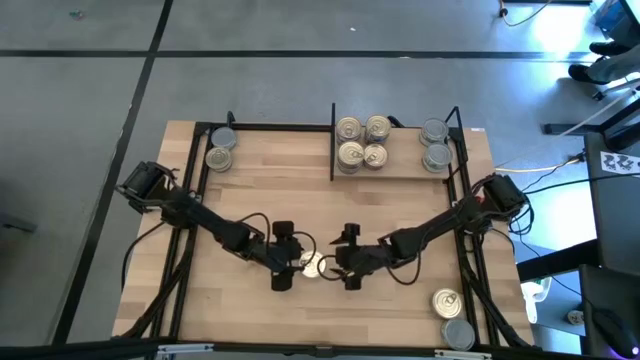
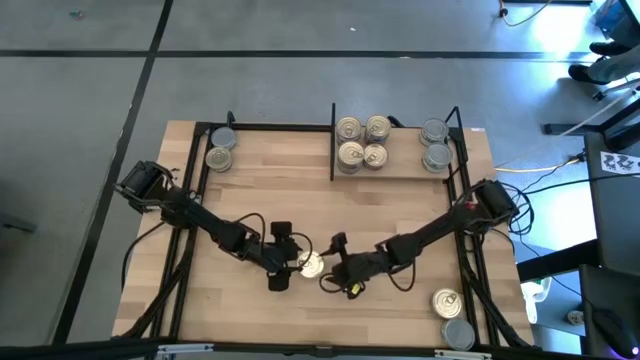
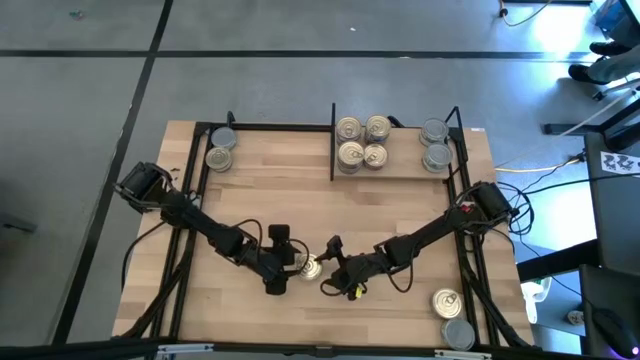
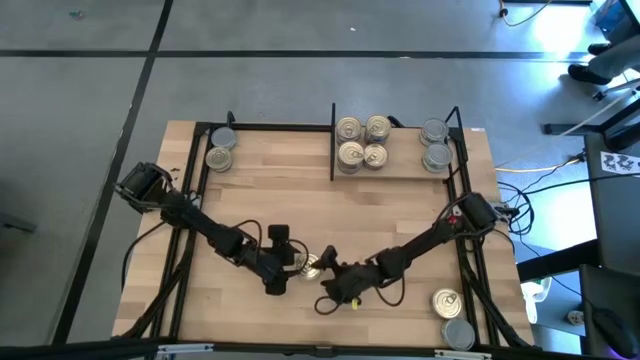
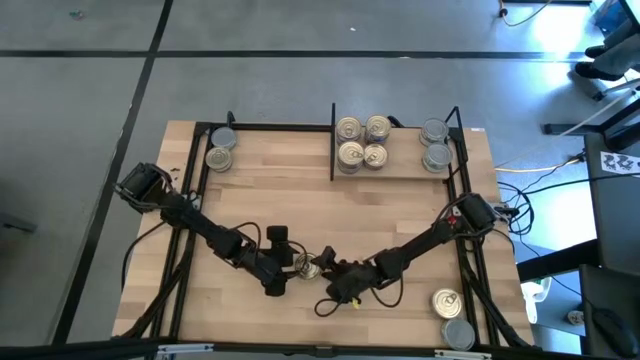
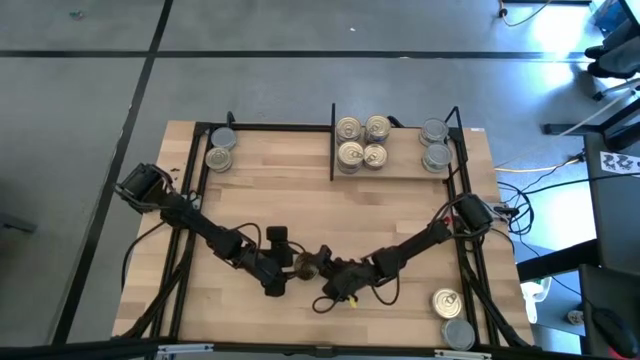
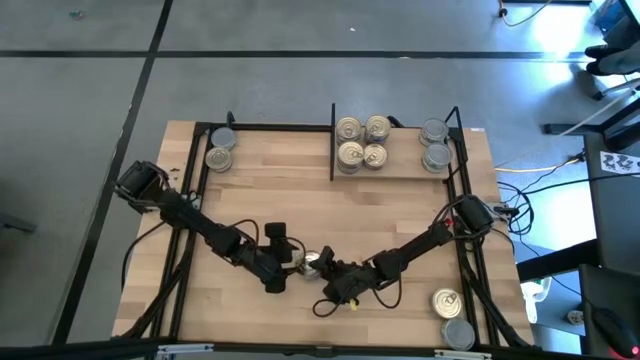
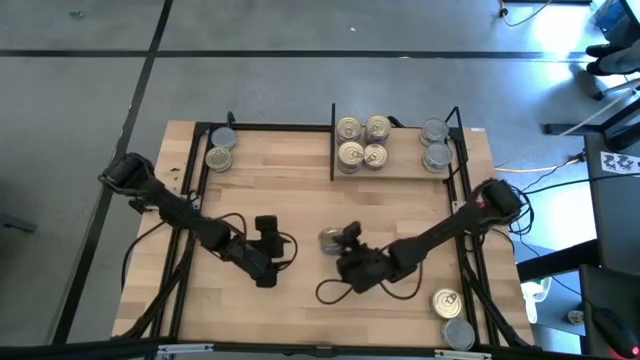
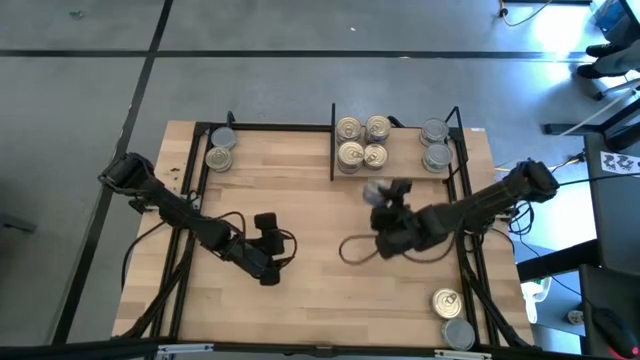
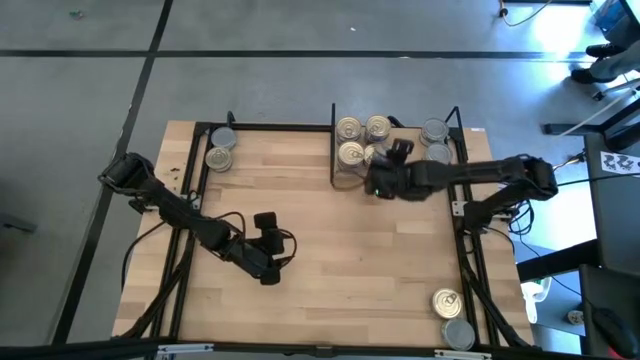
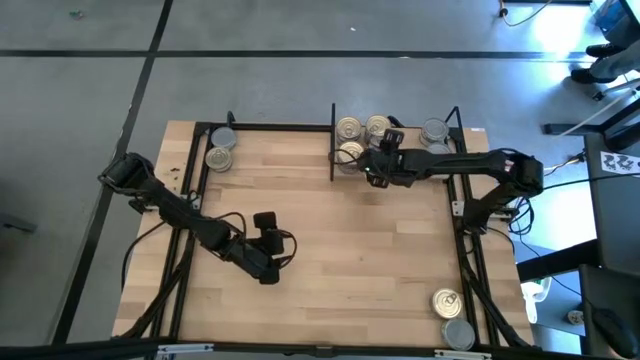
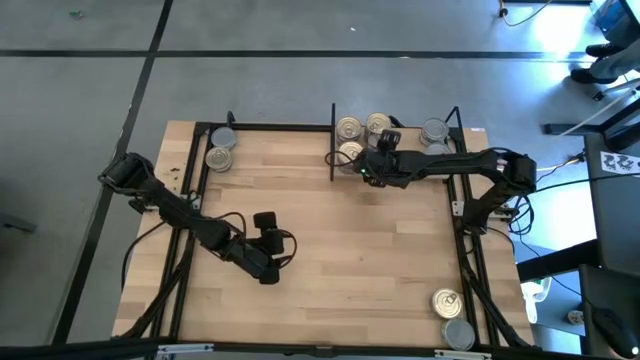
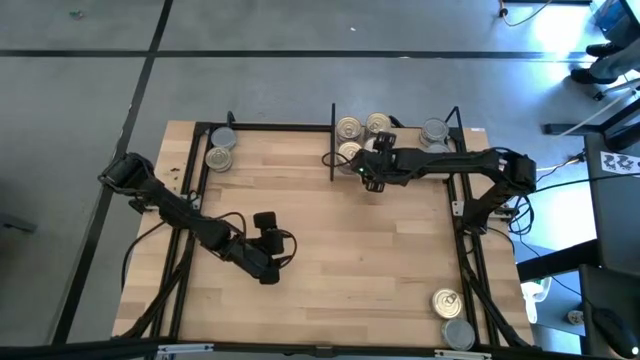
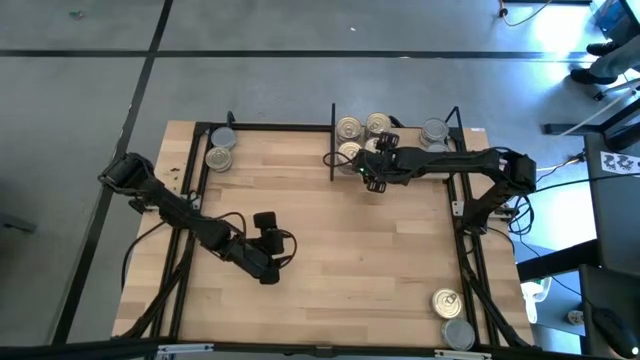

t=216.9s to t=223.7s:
Task: Stack canned seafood by type on shelf
Stack the blue tuna can on top of the blue tuna can

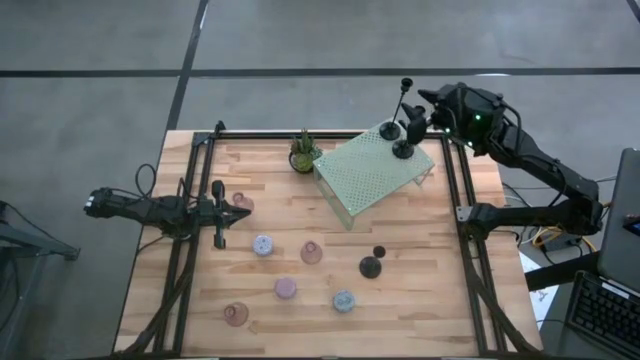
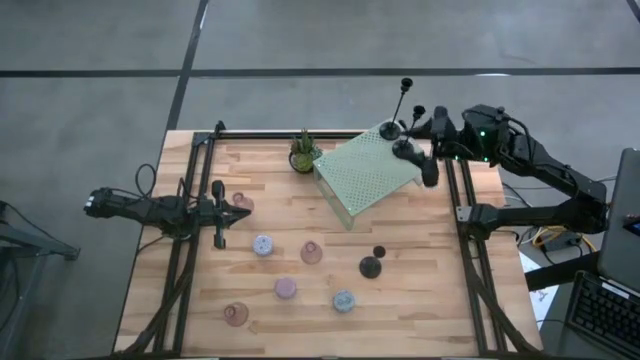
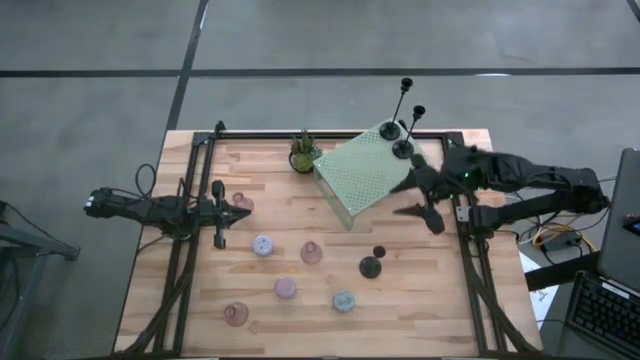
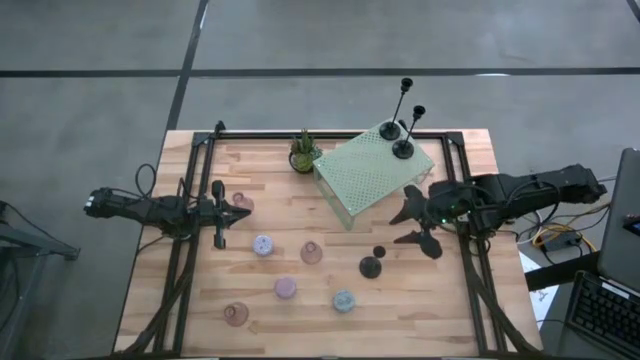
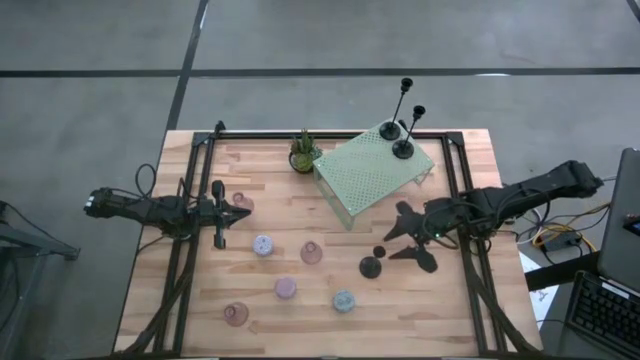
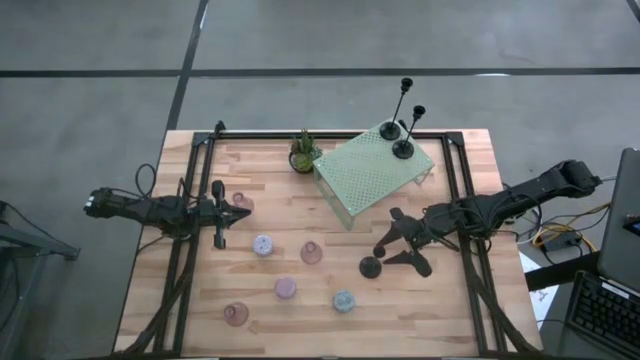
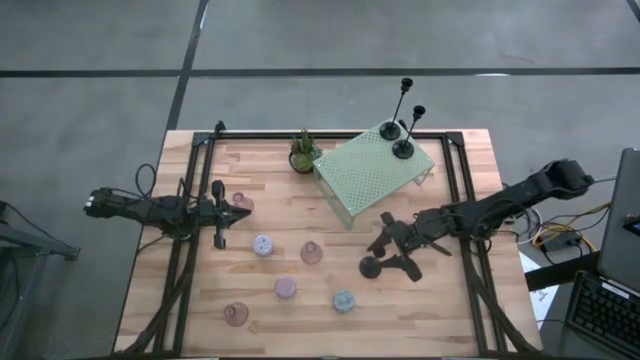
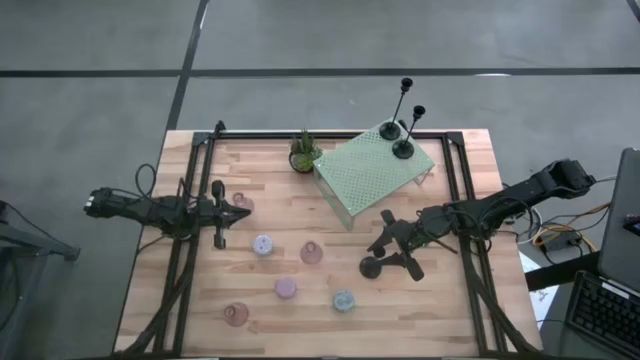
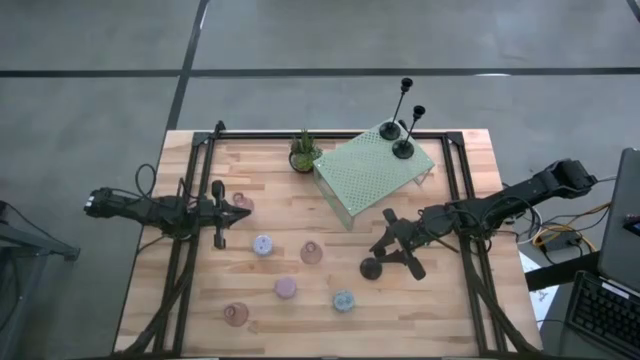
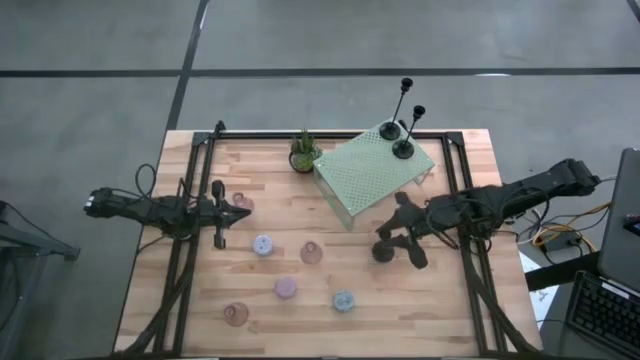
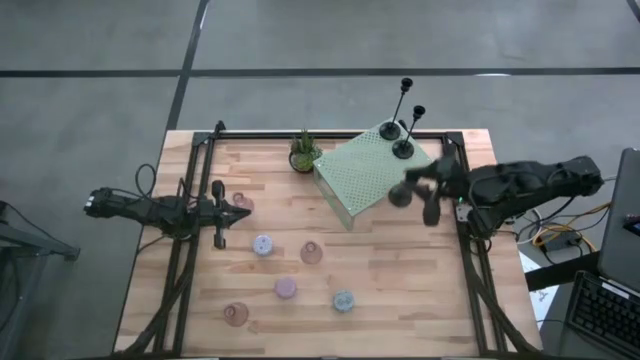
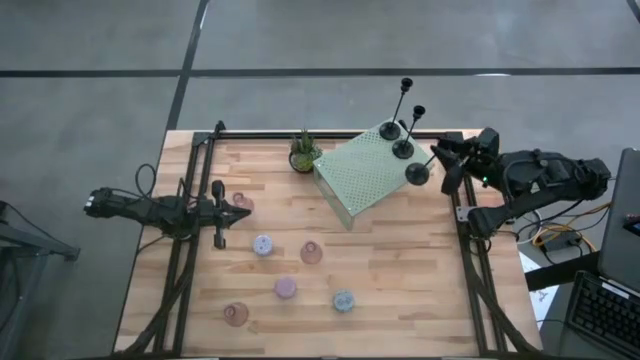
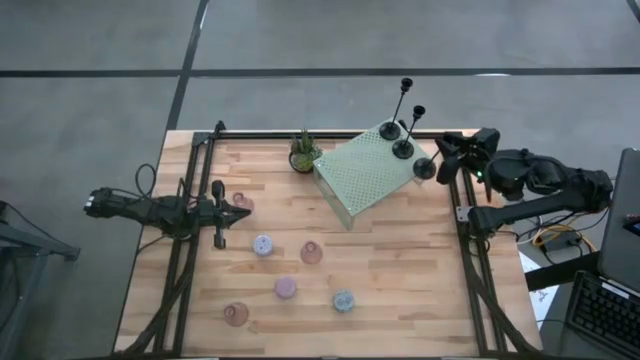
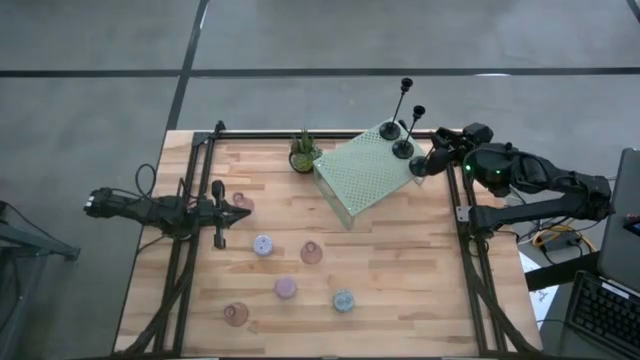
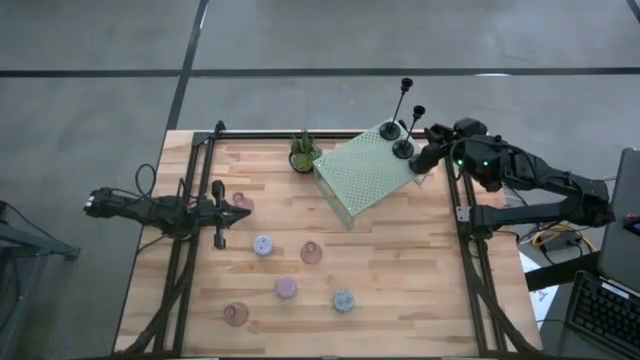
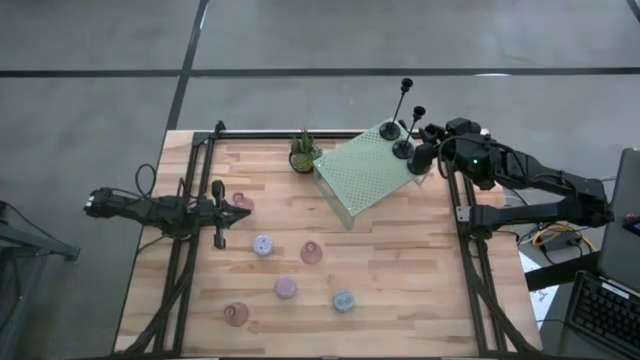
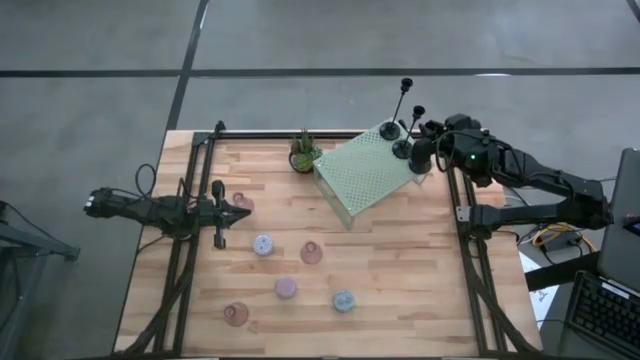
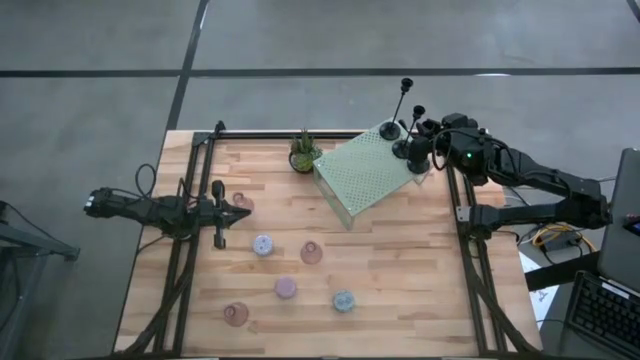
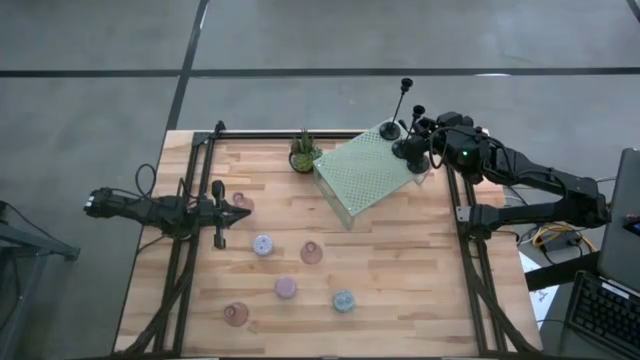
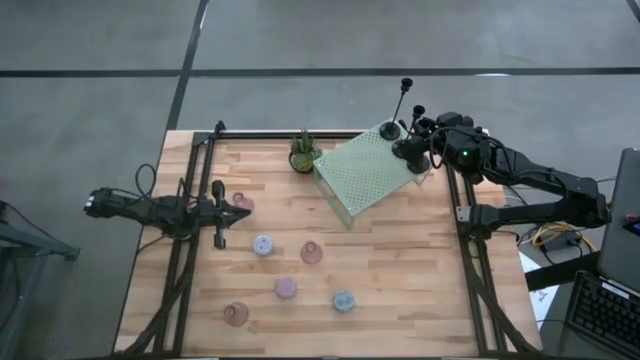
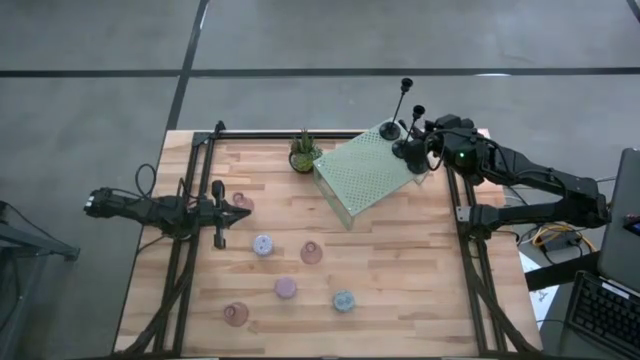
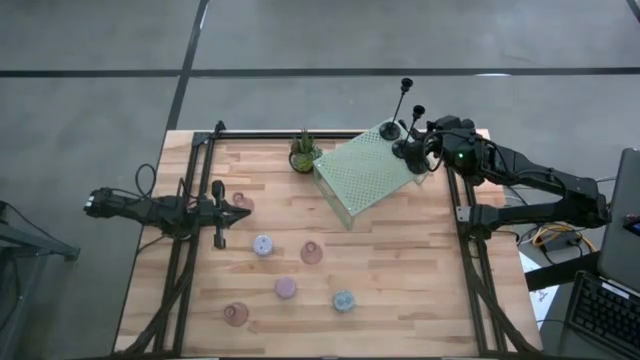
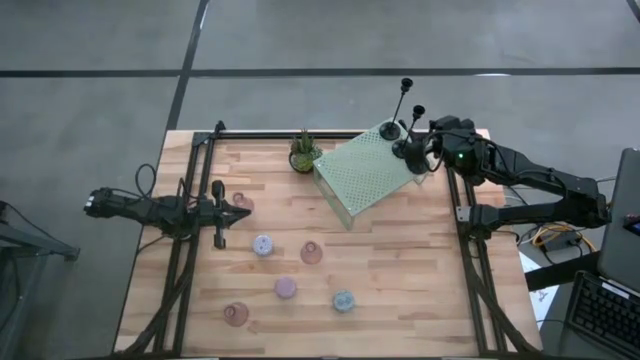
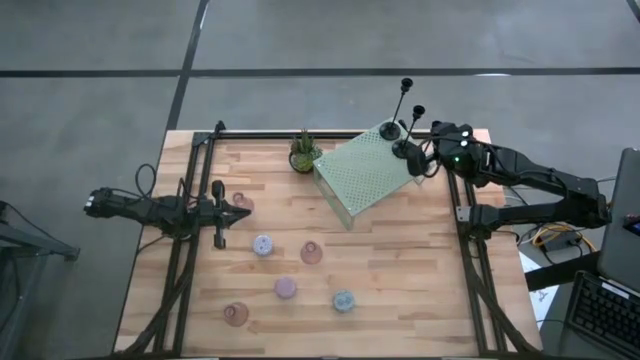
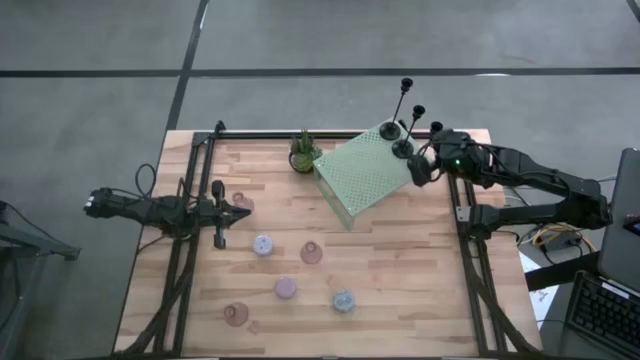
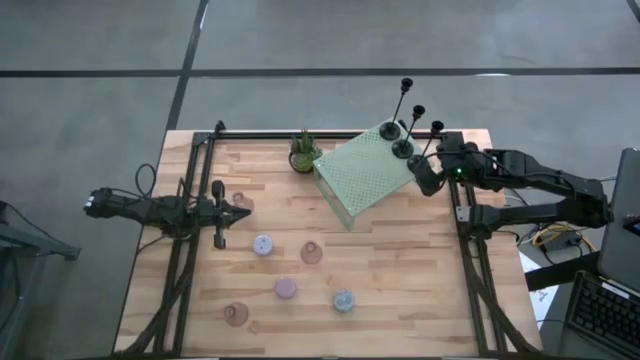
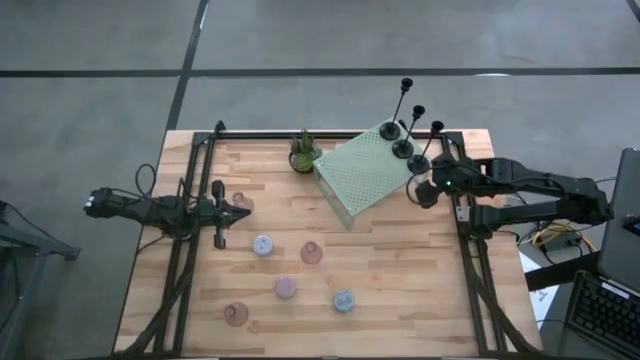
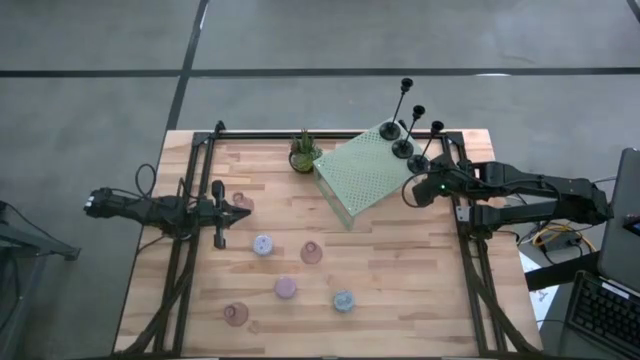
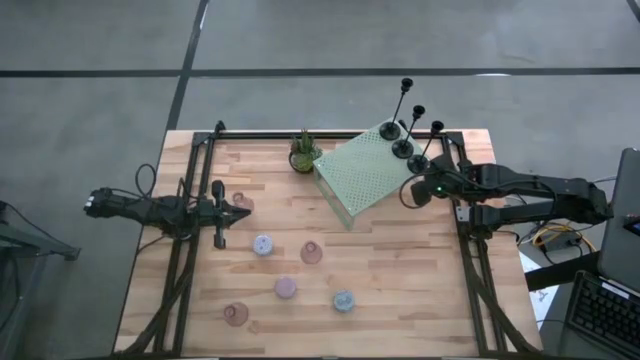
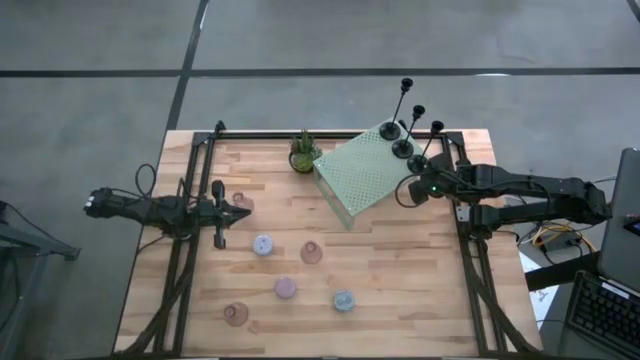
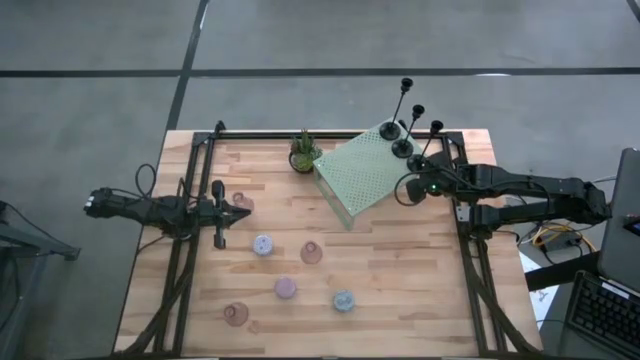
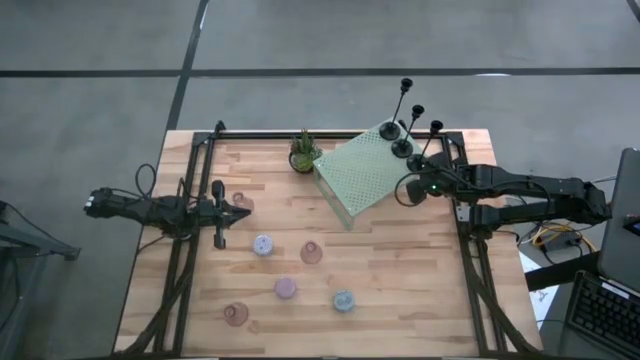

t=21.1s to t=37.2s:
Task: Pick & Place candle stick holders
Put the black candle holder on the shelf aligned with the other black candle holders
